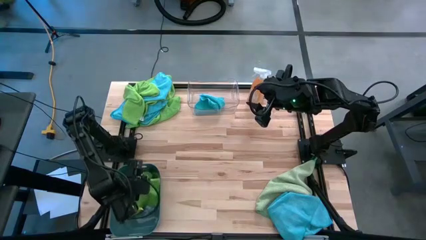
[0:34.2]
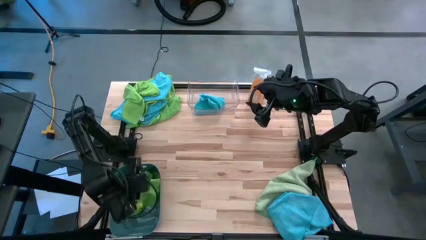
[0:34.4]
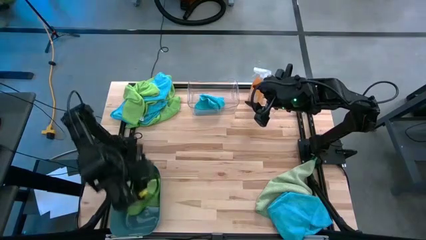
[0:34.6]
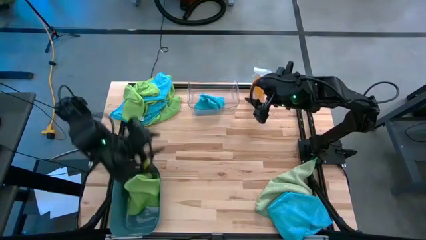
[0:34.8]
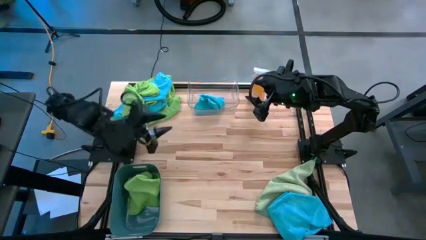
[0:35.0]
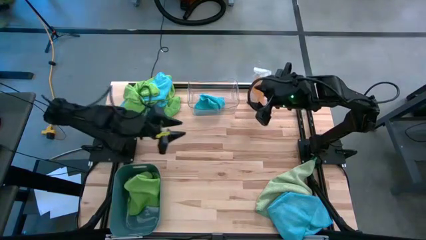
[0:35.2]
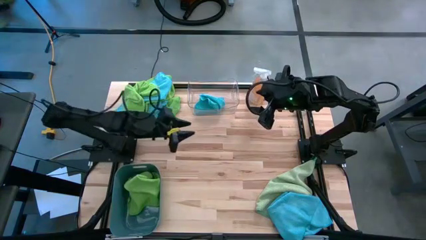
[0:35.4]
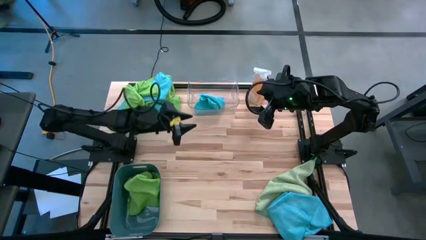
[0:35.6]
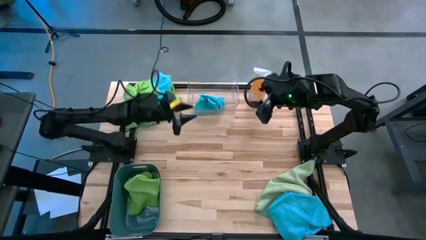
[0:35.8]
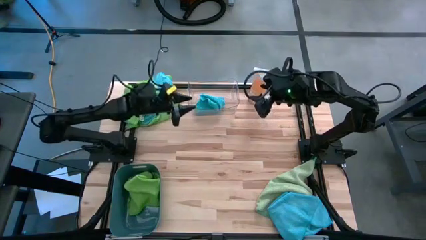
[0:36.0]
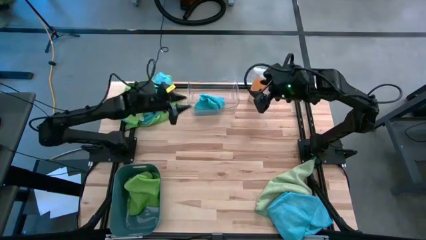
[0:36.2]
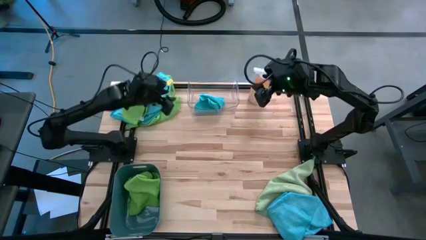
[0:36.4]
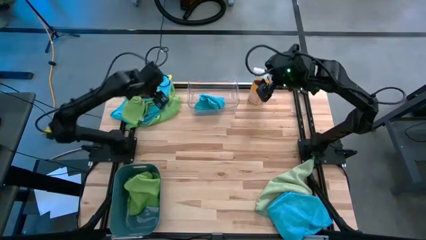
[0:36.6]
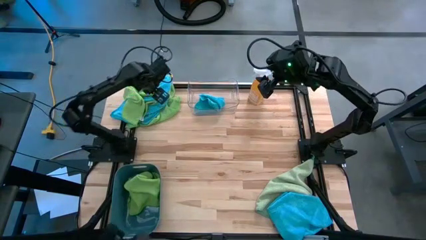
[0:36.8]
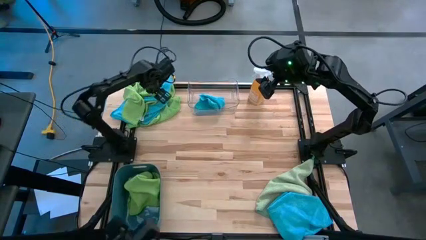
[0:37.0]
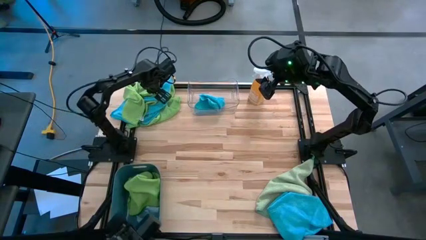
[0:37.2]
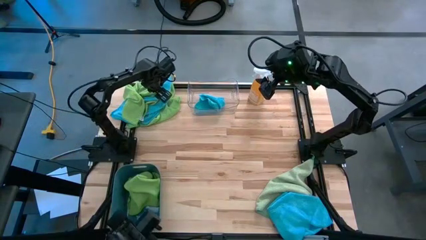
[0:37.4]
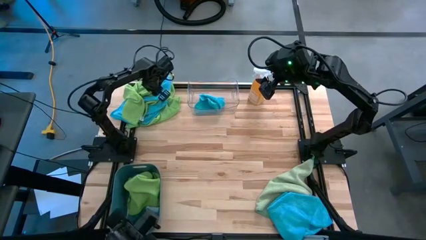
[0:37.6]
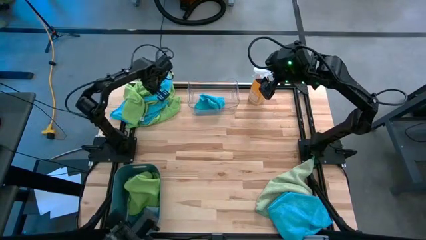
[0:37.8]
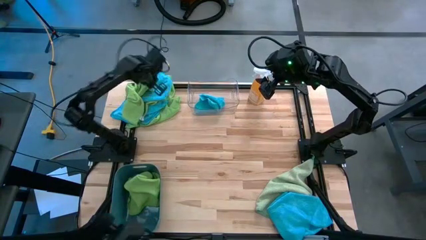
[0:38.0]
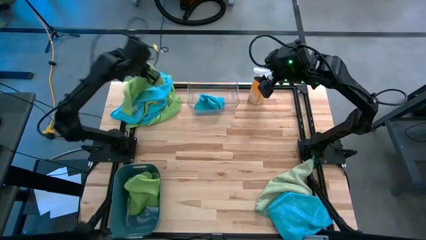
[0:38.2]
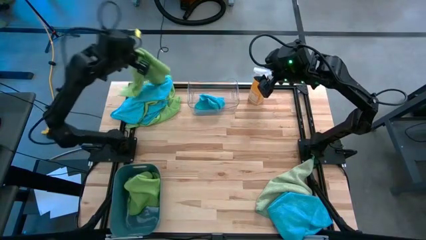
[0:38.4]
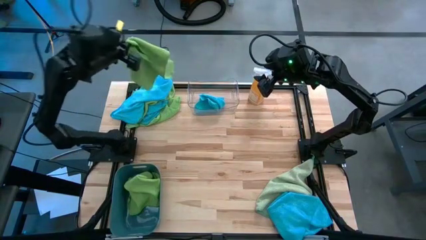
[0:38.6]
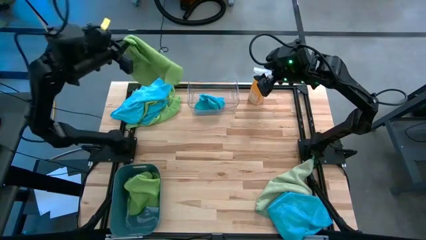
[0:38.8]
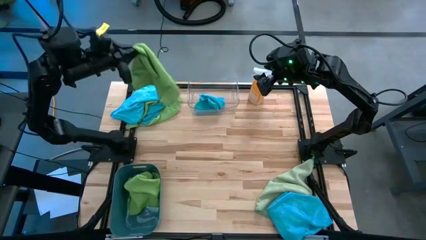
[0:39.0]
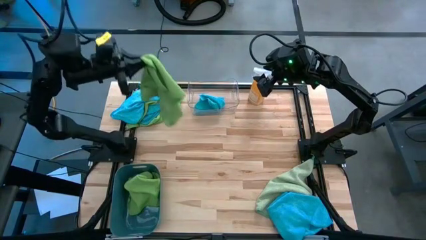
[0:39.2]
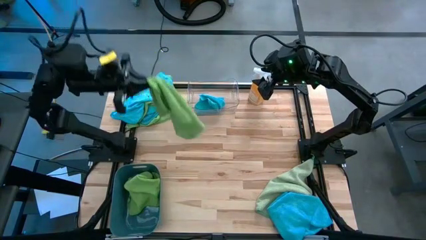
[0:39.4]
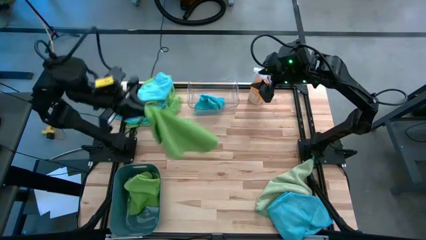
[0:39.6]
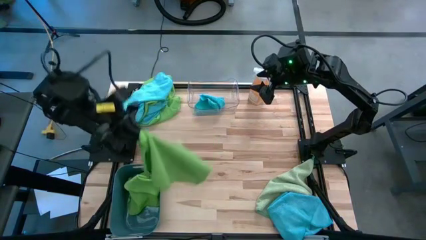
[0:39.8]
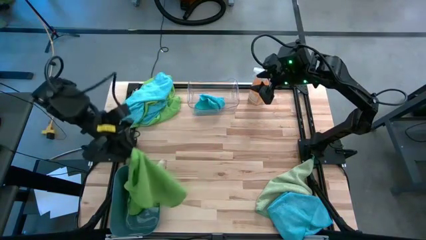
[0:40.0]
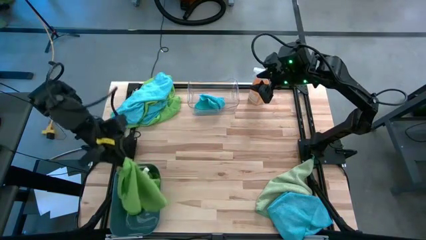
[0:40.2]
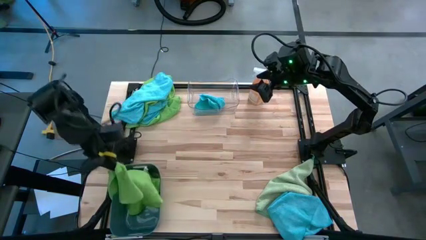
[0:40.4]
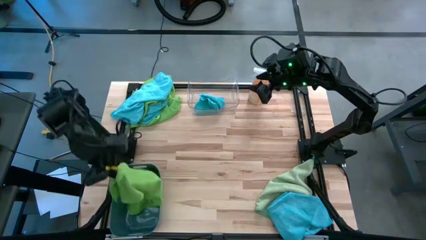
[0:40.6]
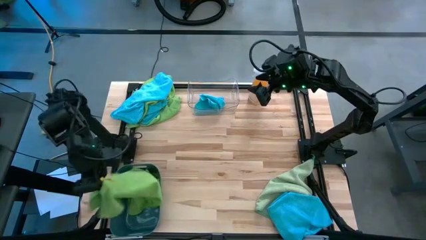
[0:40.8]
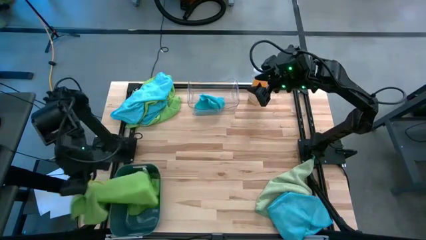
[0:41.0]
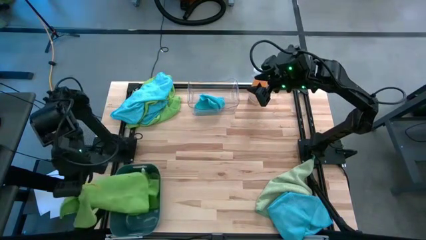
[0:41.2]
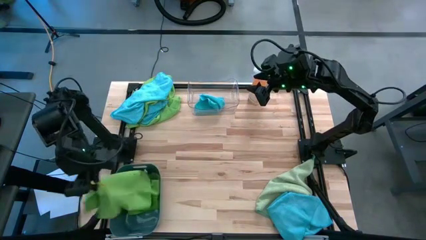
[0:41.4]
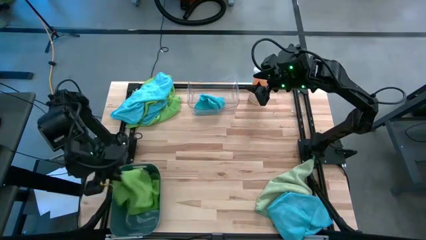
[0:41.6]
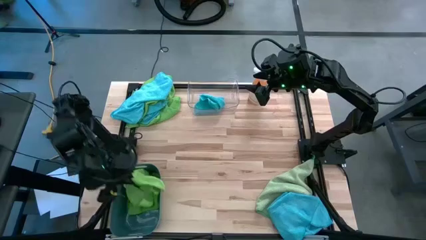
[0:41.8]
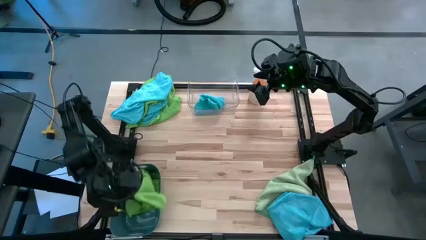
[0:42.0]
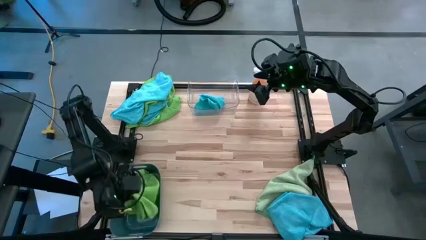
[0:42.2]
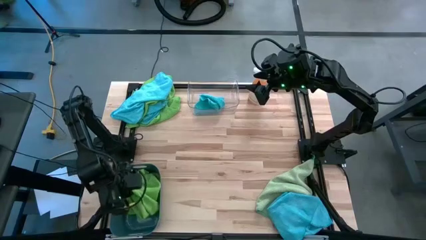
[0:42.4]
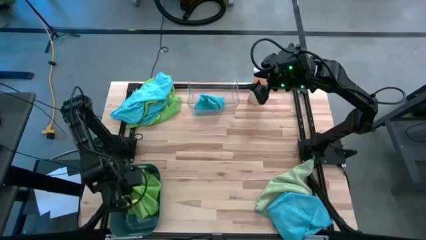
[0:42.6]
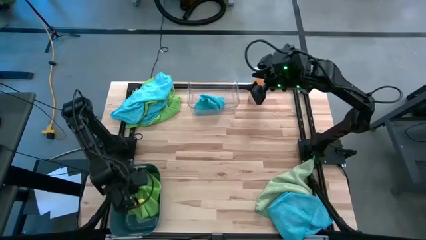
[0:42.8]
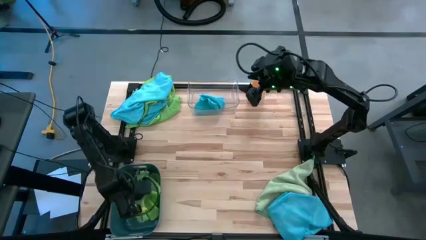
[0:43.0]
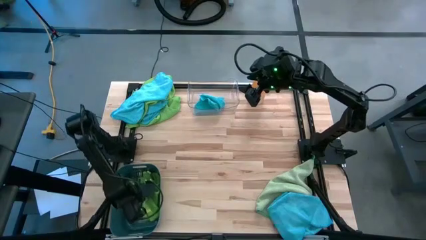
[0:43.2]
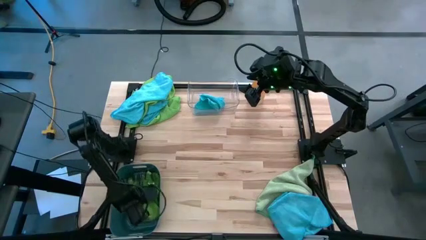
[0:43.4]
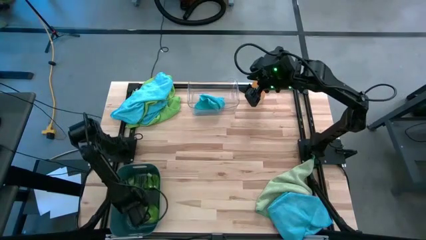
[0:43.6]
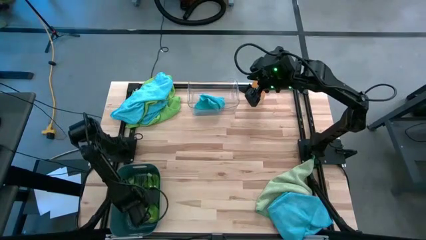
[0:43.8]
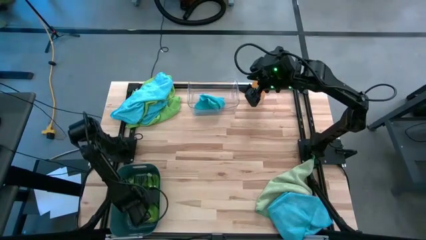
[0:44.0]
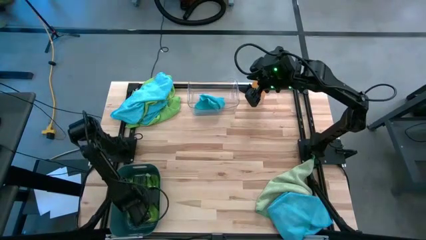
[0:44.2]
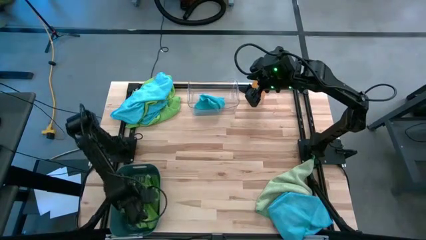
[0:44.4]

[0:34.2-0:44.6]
Task: Sort microfiber towel by color & place in baskets
Put the green microfiber towel into the blue bin

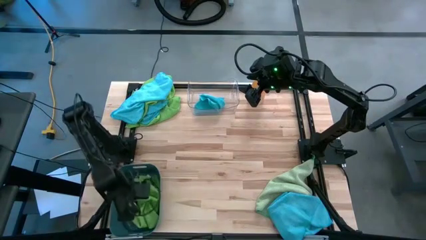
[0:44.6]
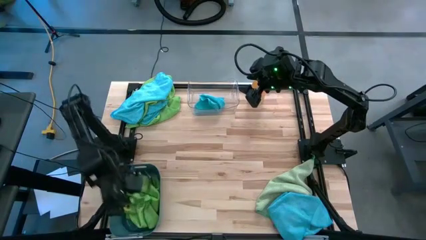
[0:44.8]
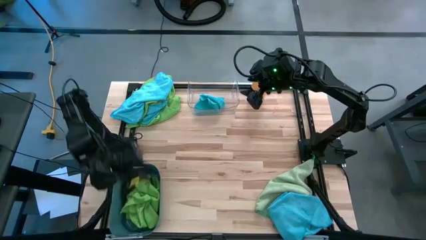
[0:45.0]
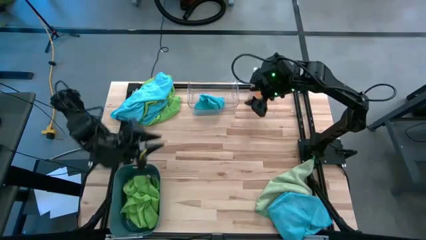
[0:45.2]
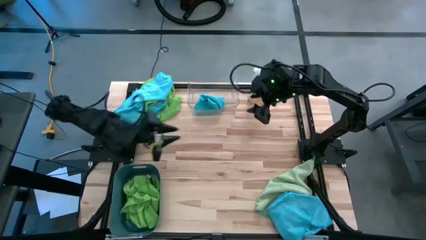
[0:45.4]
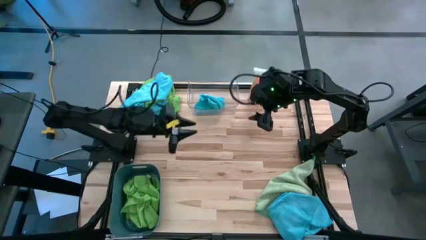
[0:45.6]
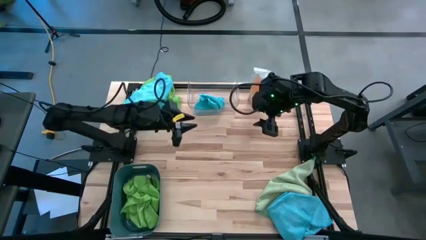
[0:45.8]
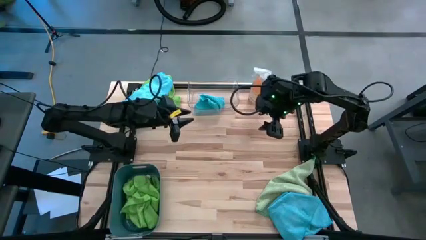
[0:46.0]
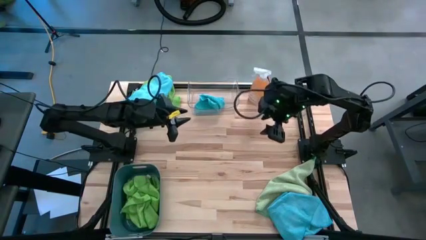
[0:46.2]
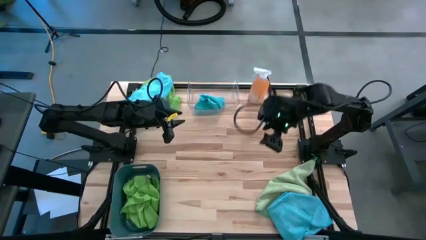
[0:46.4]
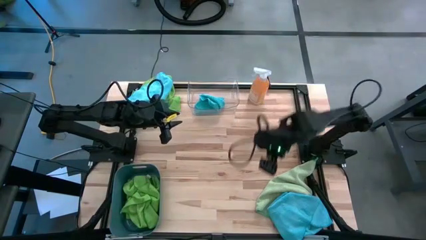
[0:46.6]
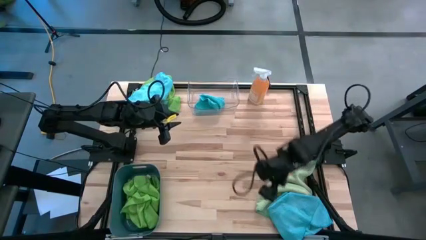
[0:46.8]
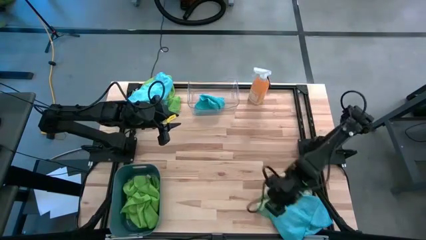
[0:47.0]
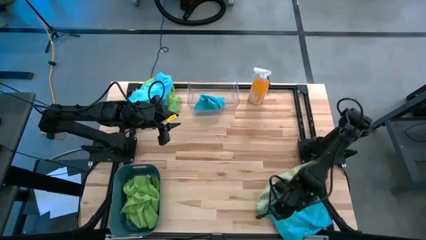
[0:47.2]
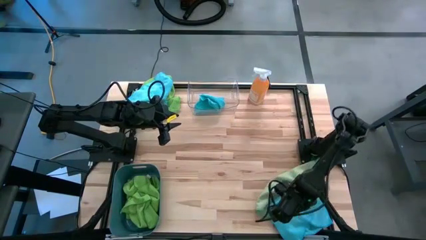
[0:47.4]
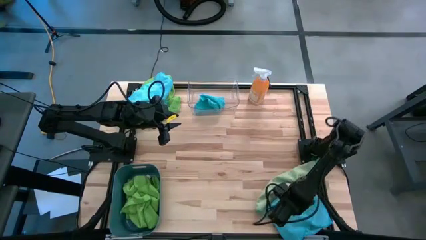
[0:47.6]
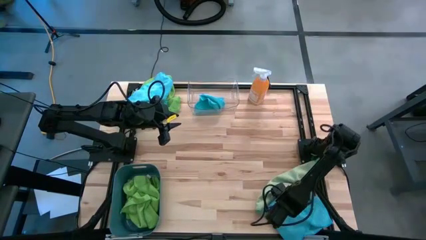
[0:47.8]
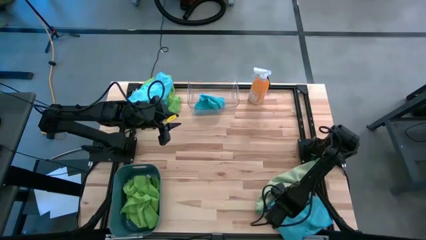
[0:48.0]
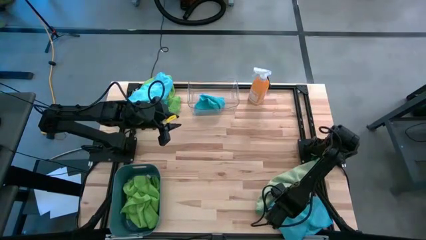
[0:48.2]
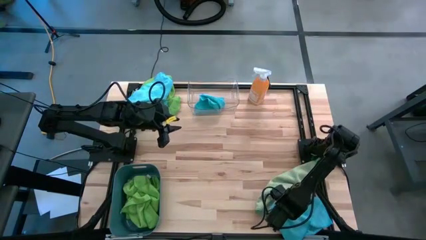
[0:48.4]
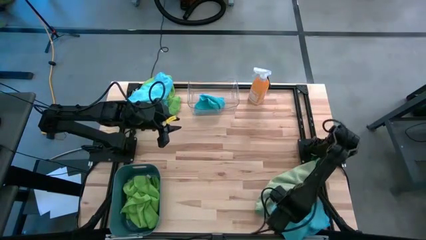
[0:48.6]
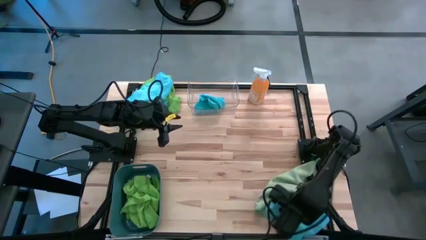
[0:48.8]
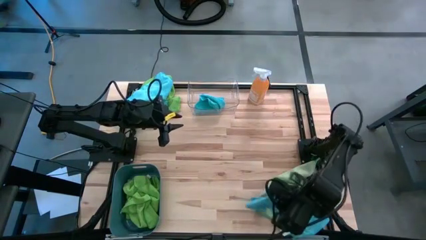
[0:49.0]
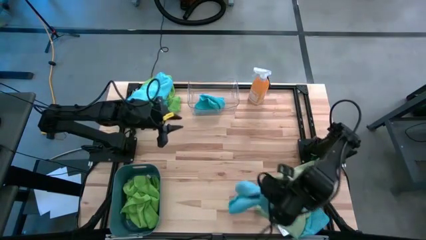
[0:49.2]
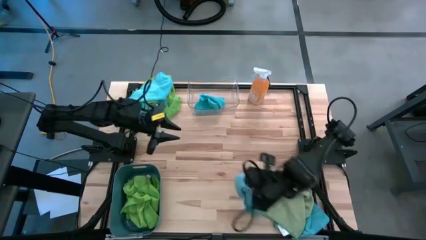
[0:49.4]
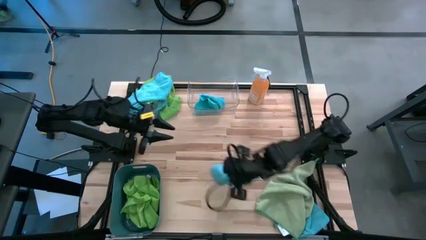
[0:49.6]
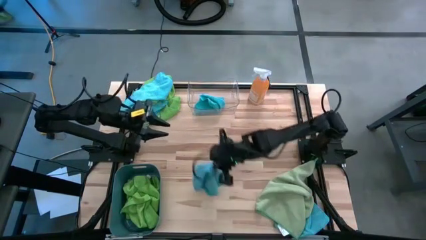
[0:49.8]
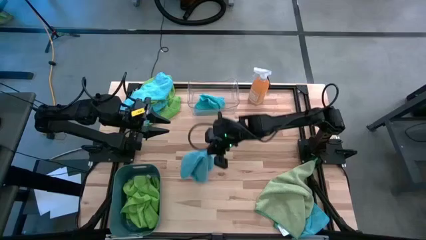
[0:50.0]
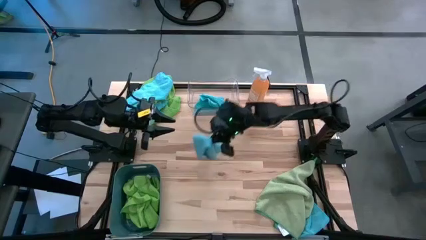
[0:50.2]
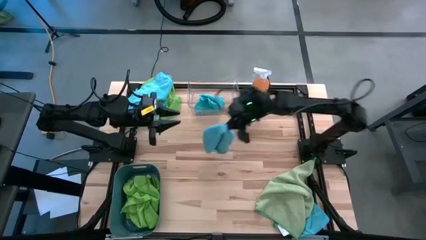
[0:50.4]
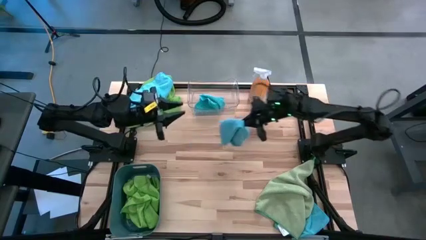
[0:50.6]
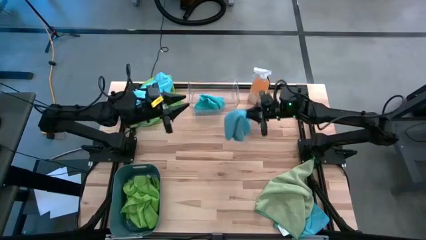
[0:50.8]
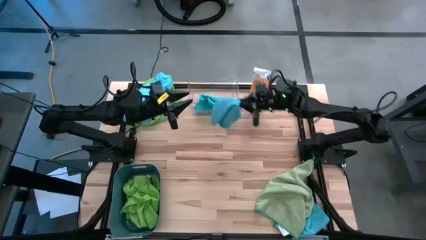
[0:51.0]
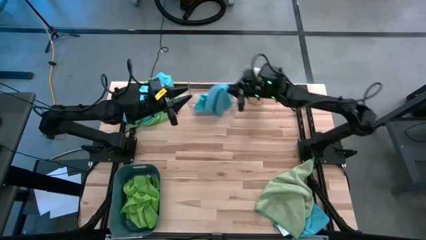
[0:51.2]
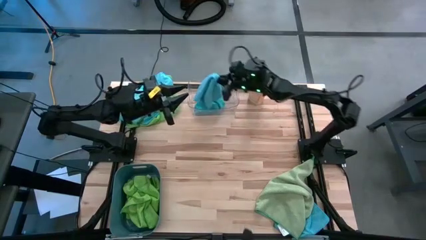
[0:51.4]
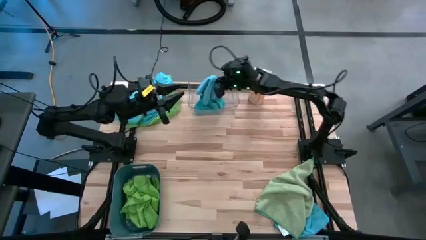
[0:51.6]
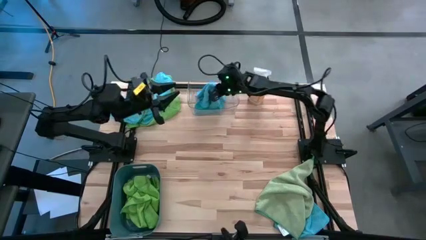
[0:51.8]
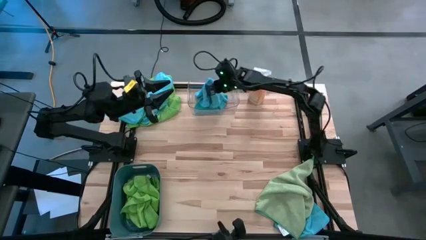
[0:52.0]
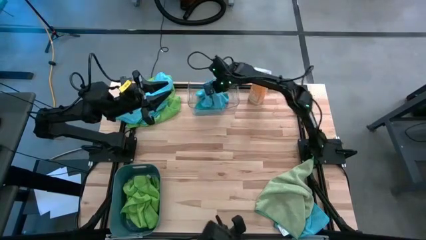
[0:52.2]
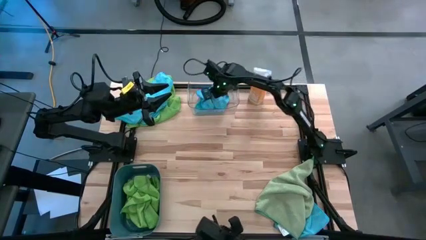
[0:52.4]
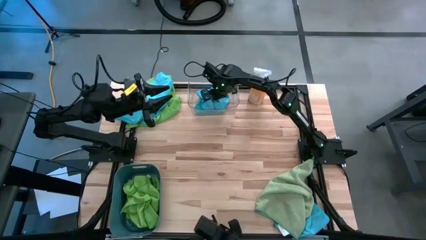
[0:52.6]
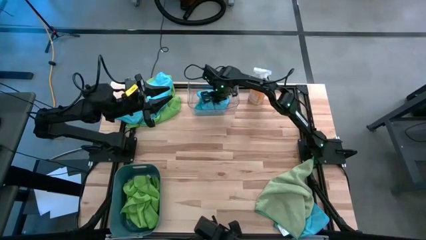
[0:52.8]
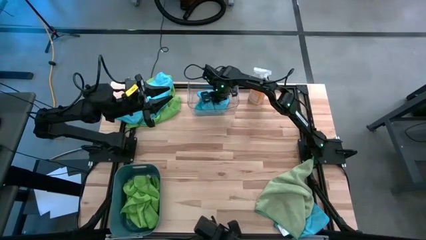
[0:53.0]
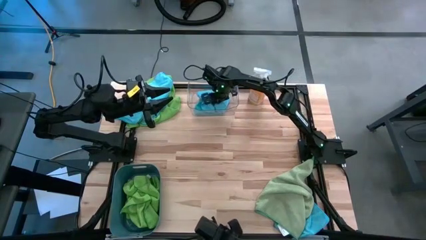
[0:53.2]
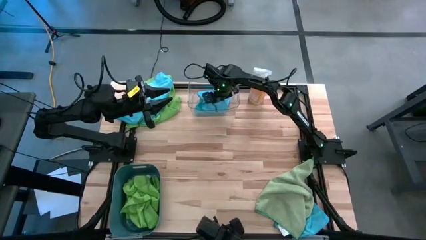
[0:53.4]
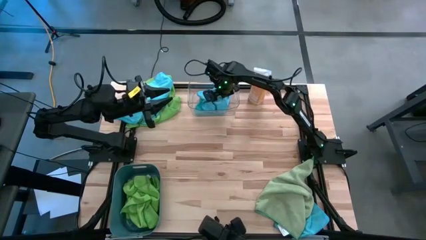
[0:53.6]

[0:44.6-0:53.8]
Put the blue microfiber towel into the transparent bin
